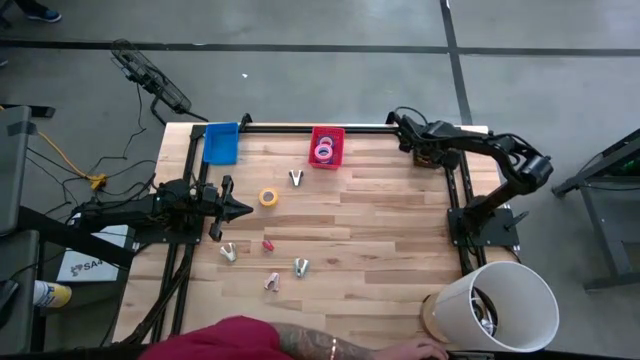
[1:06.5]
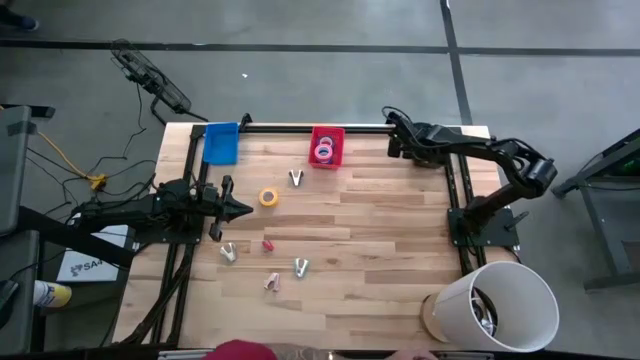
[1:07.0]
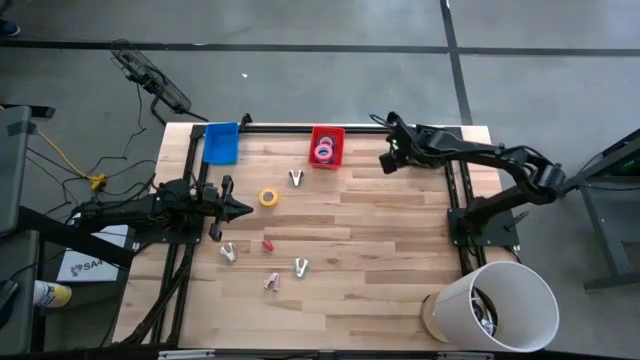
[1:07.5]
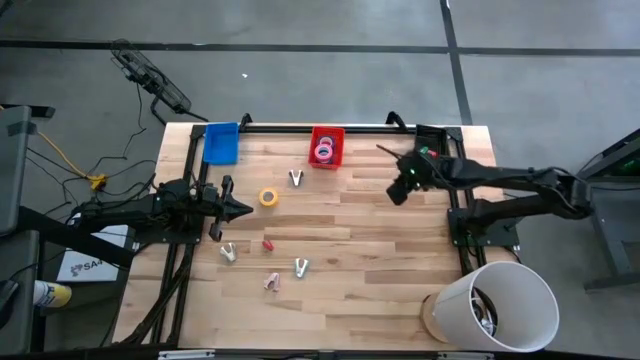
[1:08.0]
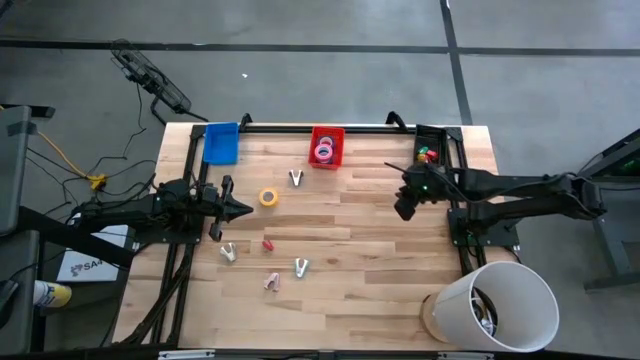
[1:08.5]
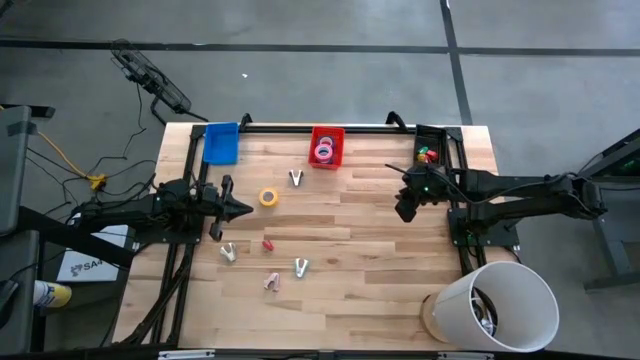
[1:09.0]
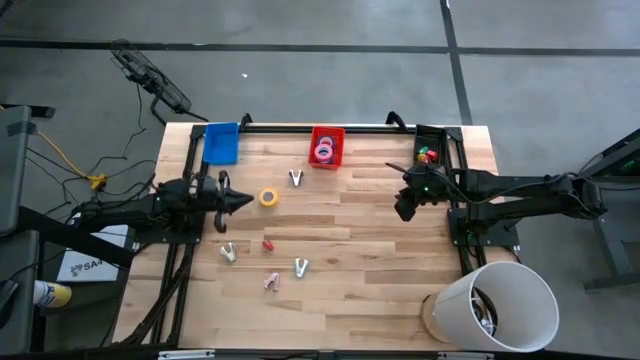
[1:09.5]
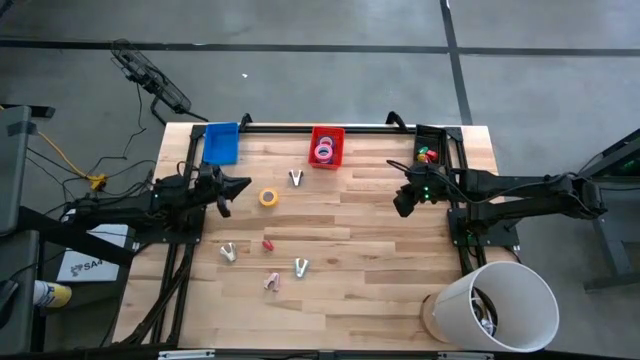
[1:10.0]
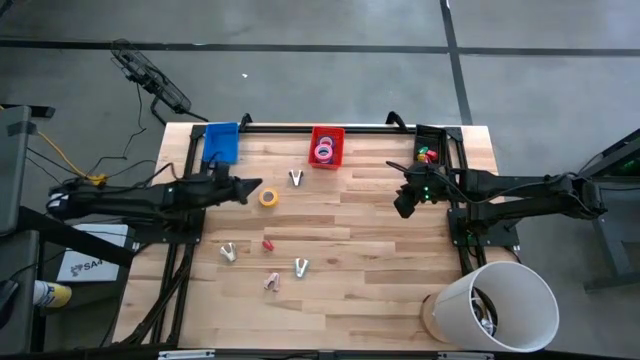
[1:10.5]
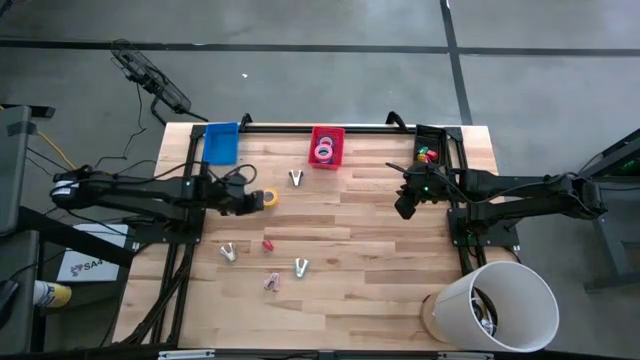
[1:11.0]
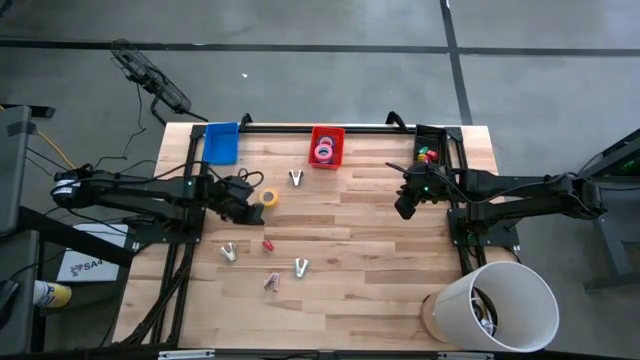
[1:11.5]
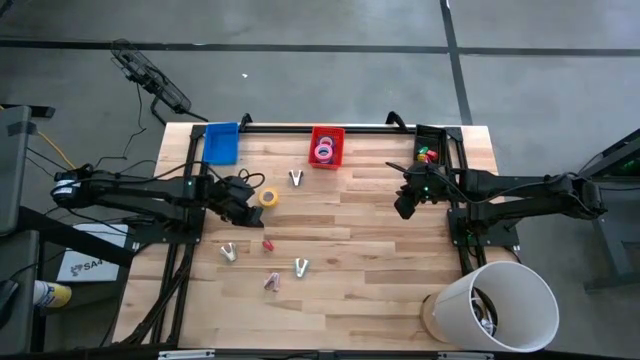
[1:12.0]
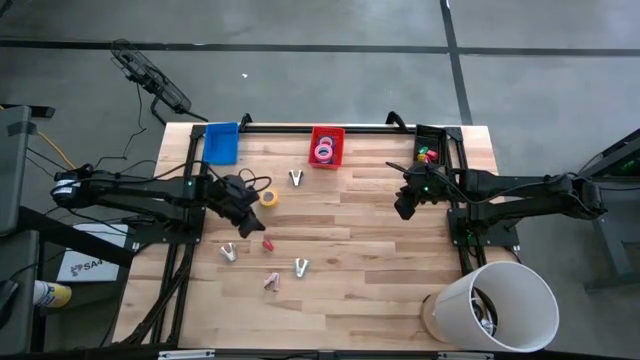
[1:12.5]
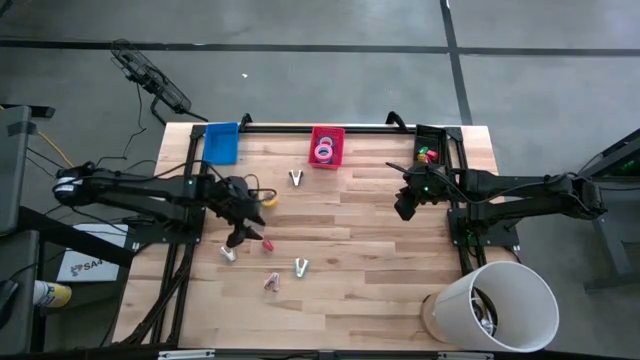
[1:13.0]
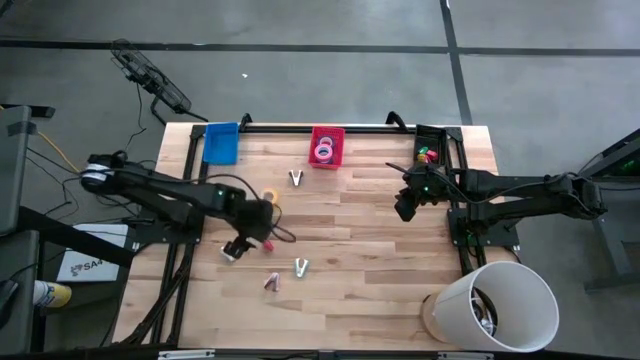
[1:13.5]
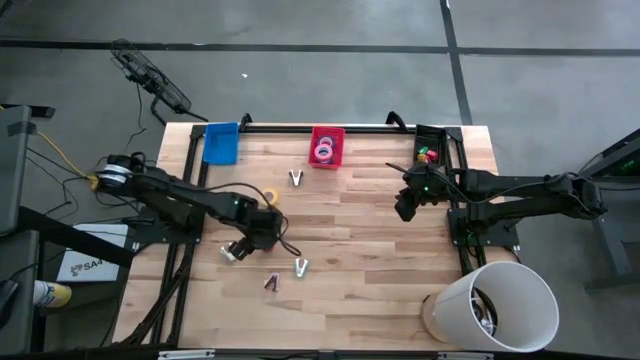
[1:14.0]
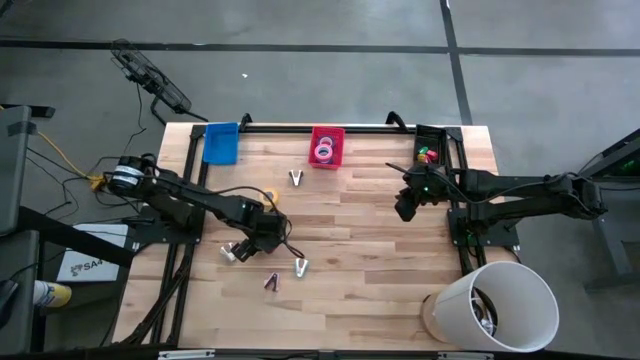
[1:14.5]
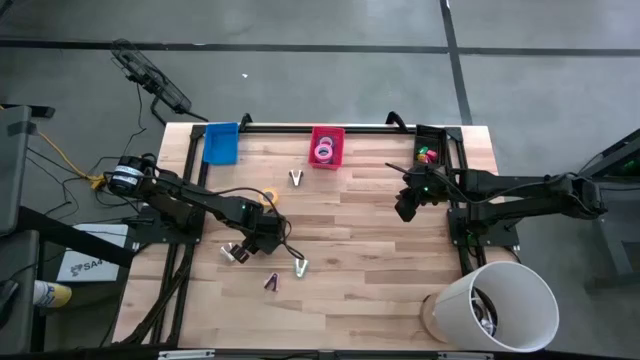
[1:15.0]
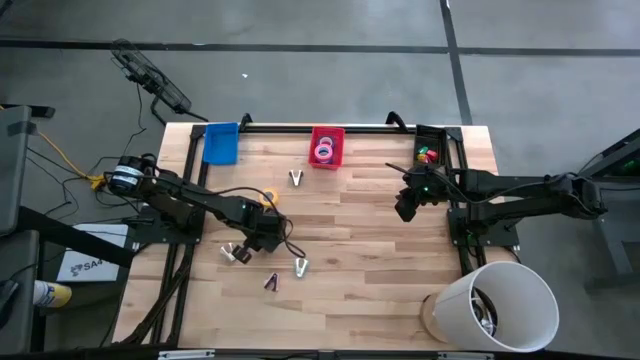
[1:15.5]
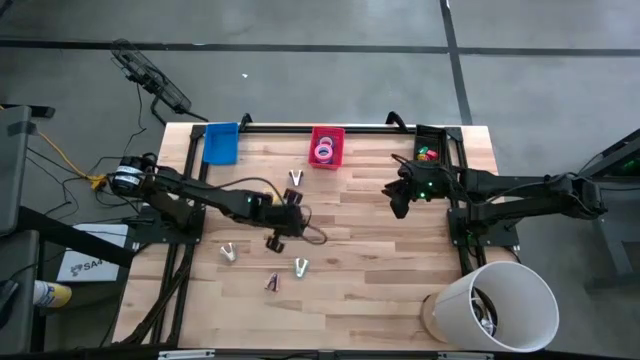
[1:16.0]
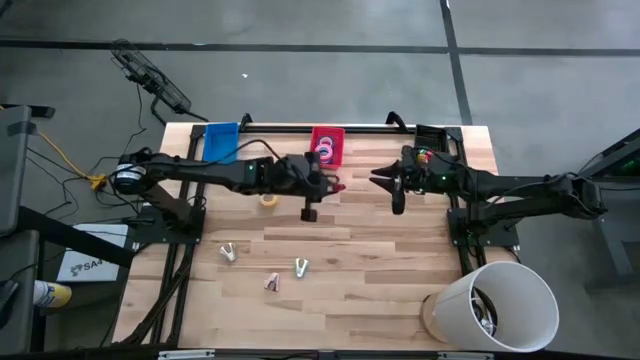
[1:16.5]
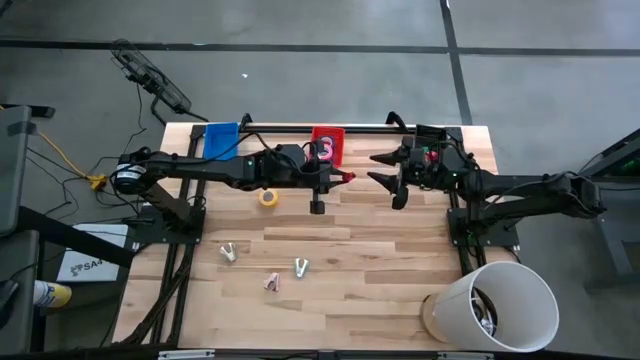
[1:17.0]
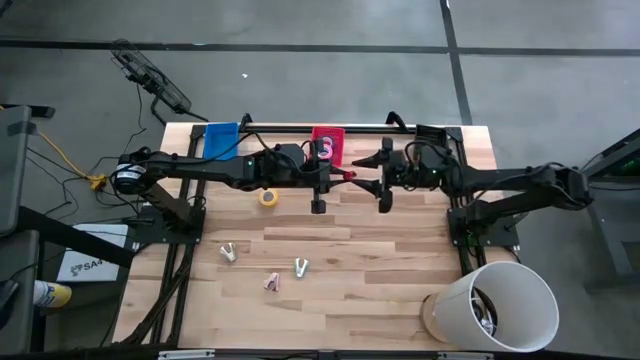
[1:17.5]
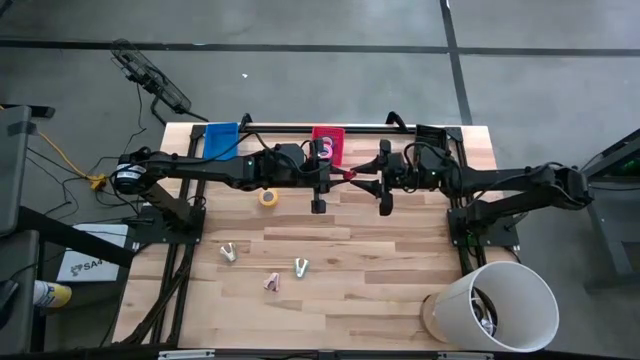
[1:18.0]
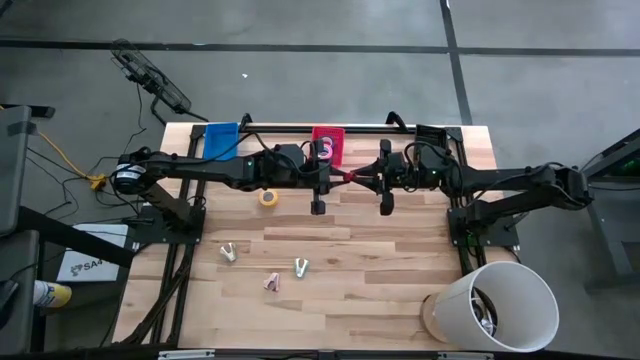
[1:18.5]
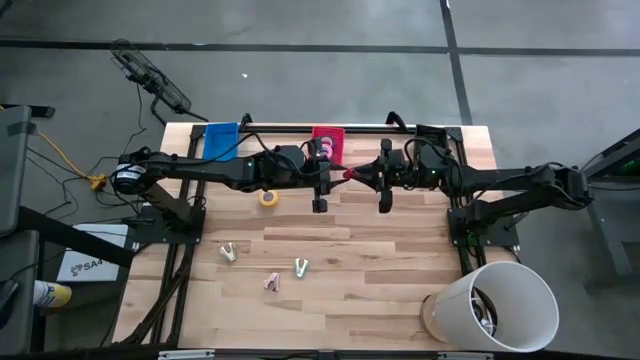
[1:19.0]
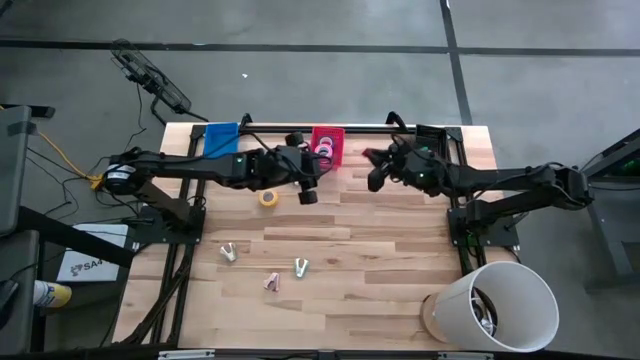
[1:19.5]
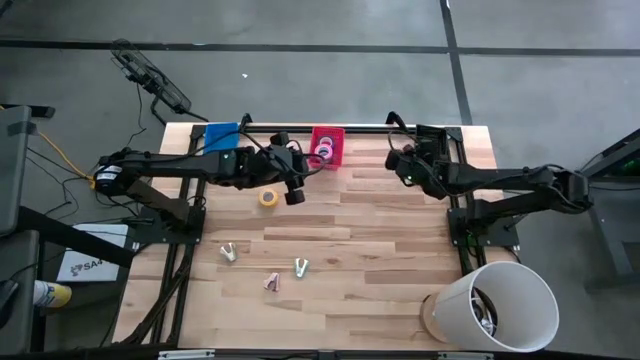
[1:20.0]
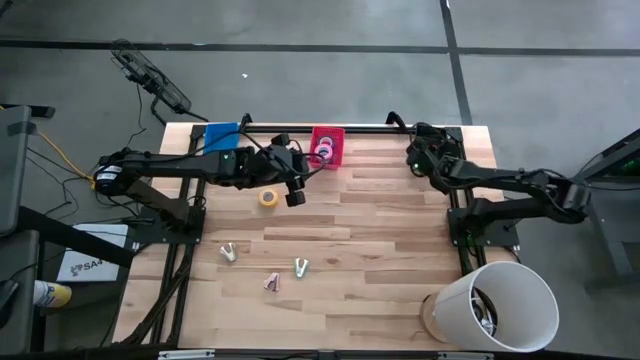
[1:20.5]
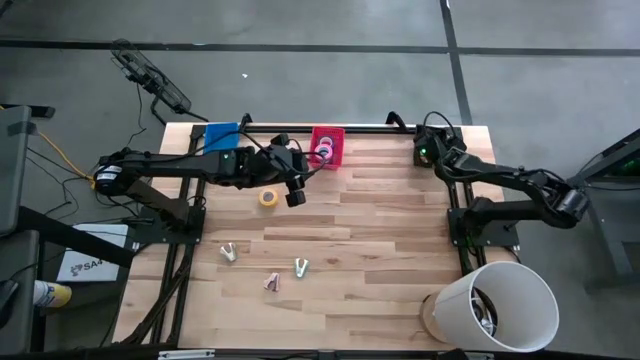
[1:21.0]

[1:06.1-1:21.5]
Task: Pick and place Stapler, Stapler remover, tape
Put the red stapler into the black bin

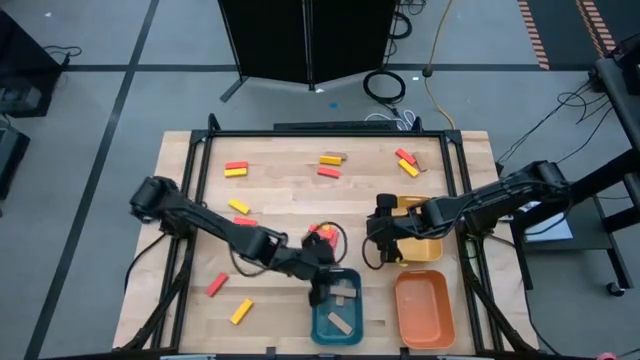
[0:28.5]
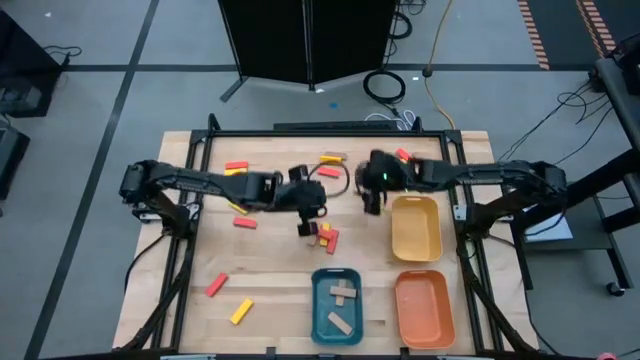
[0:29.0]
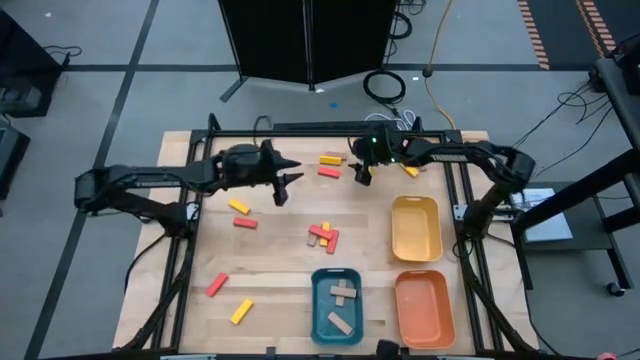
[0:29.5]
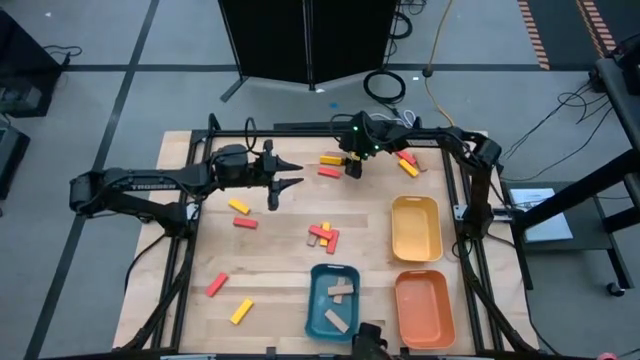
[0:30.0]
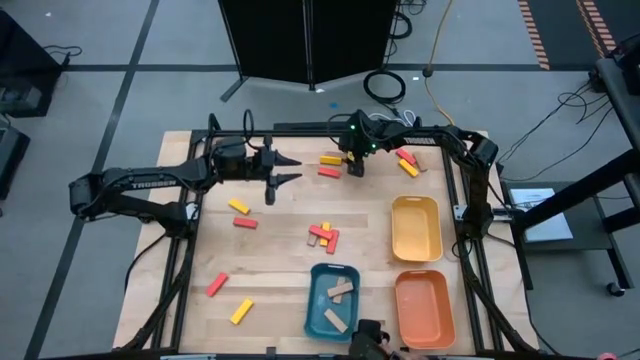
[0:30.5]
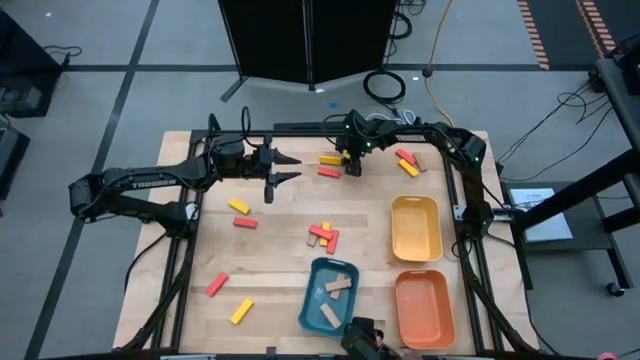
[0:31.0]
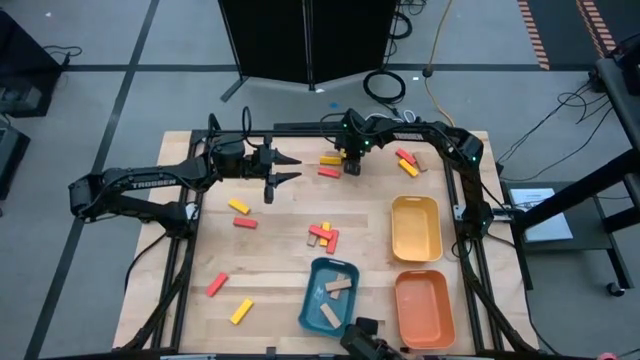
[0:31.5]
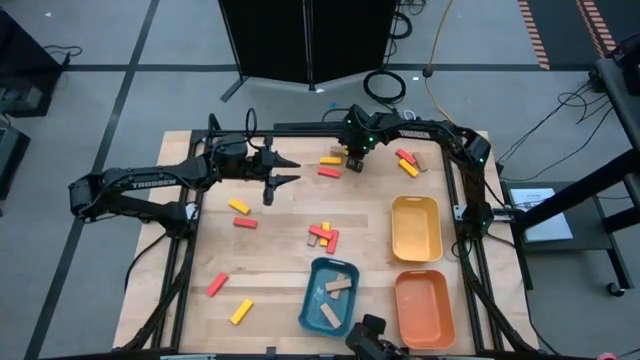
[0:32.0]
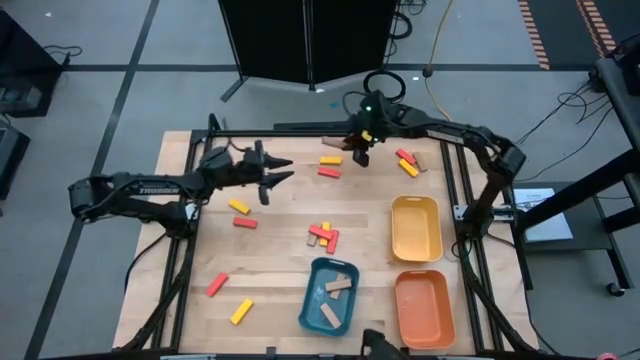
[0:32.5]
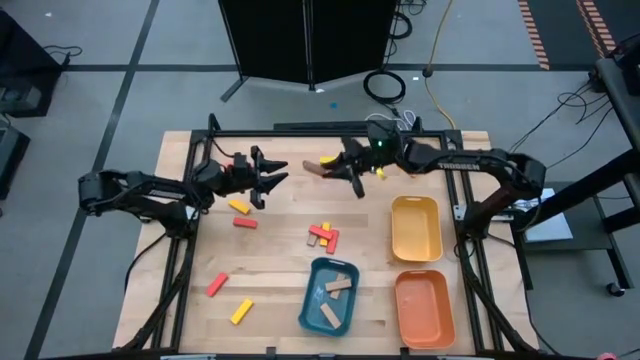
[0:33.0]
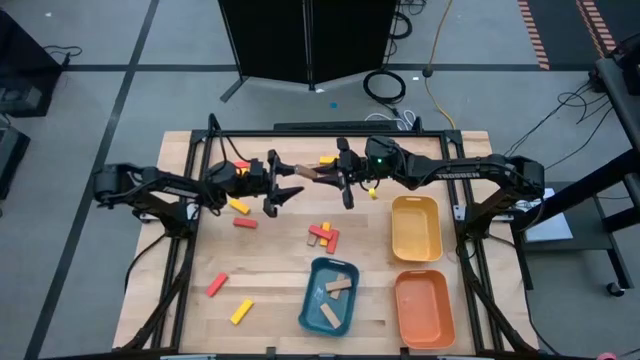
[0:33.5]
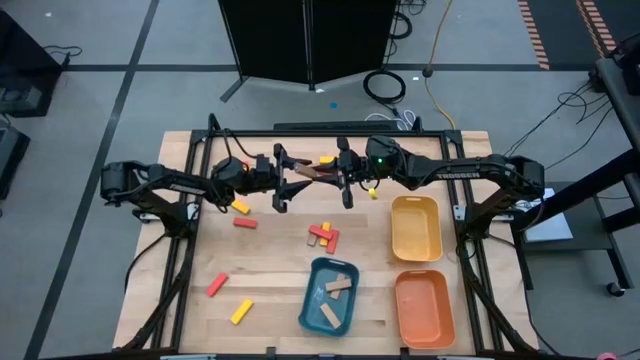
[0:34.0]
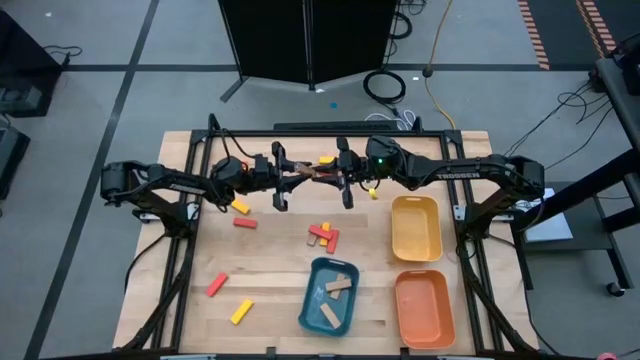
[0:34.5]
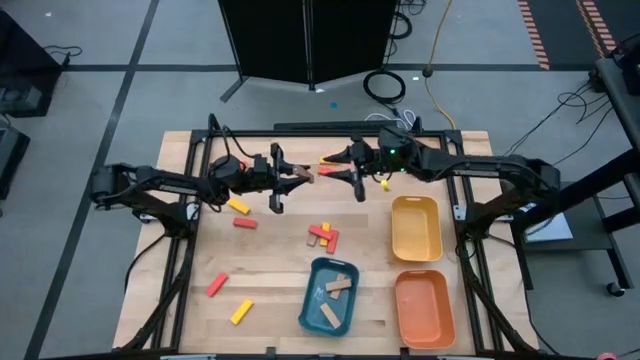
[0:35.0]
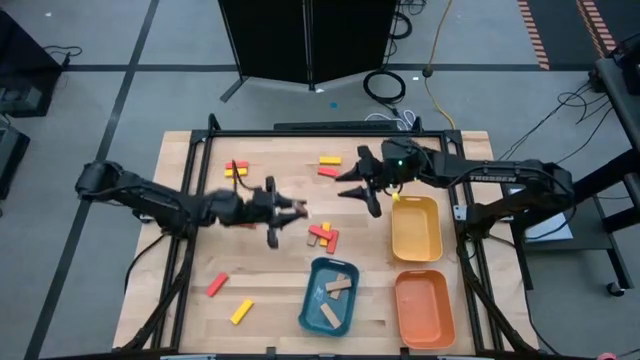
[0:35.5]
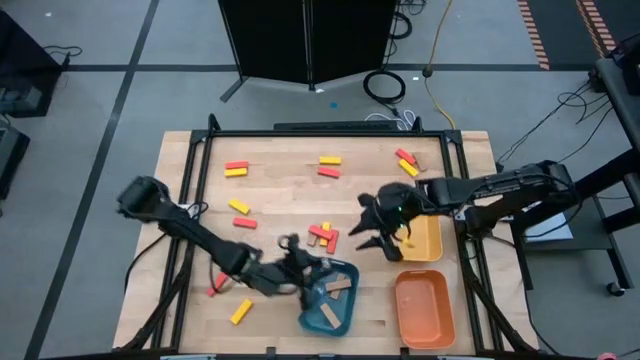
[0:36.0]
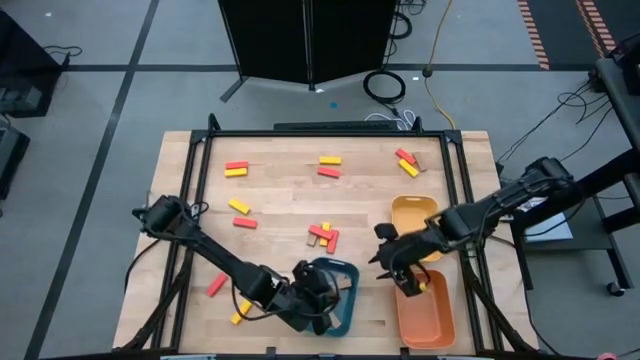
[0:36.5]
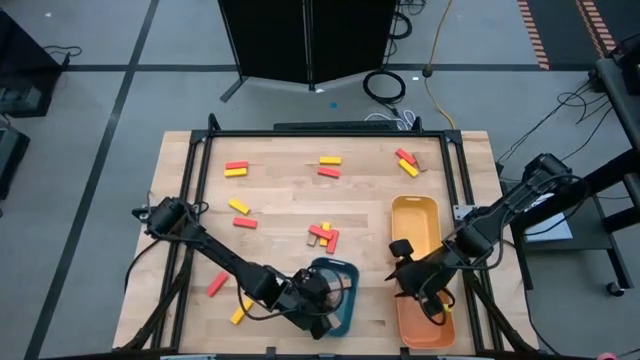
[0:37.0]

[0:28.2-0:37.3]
Task: Sort blocks
Put the brown block into the blue bin
